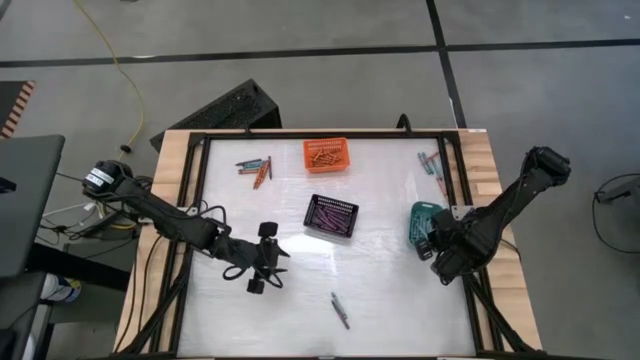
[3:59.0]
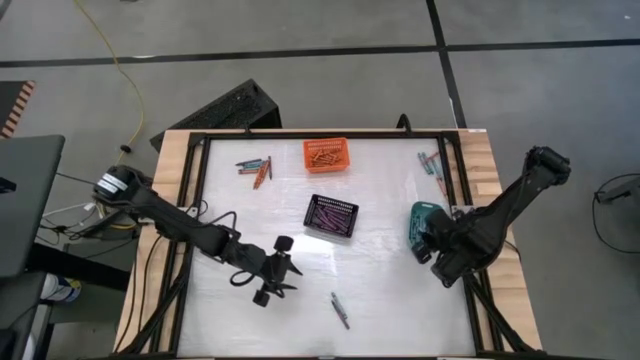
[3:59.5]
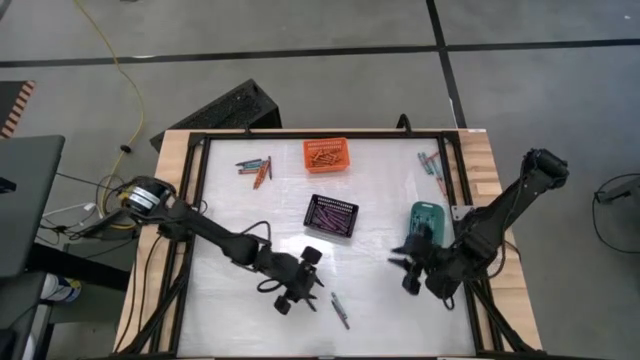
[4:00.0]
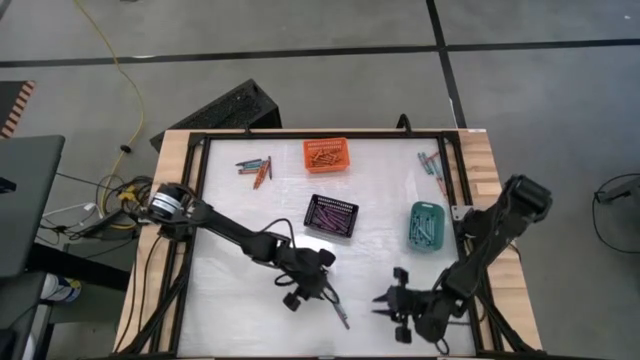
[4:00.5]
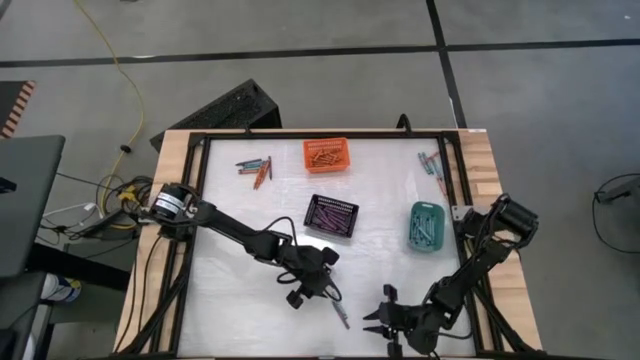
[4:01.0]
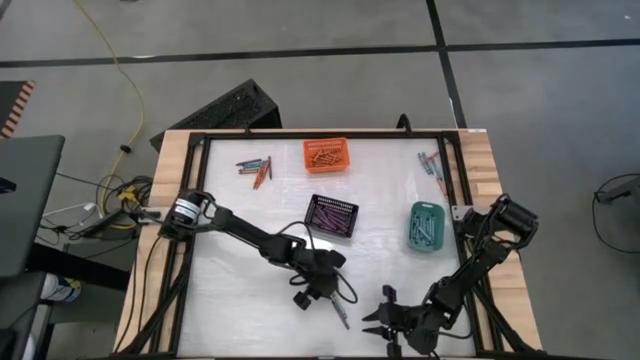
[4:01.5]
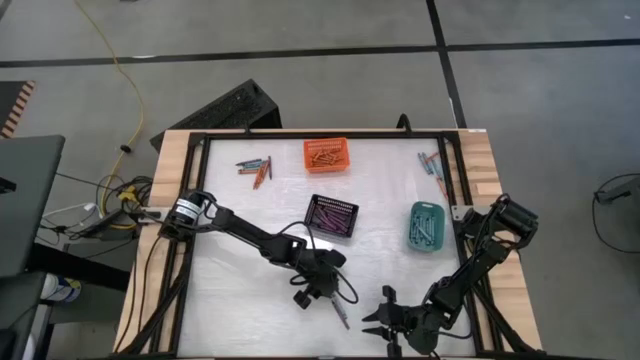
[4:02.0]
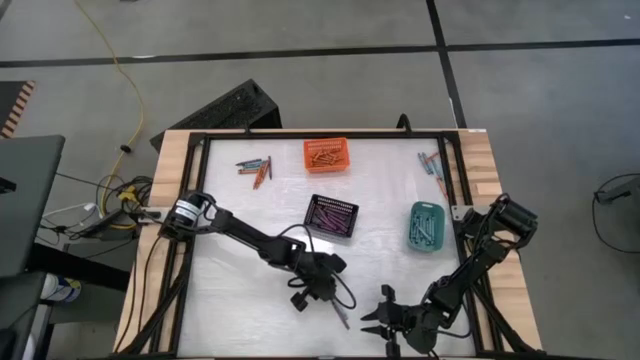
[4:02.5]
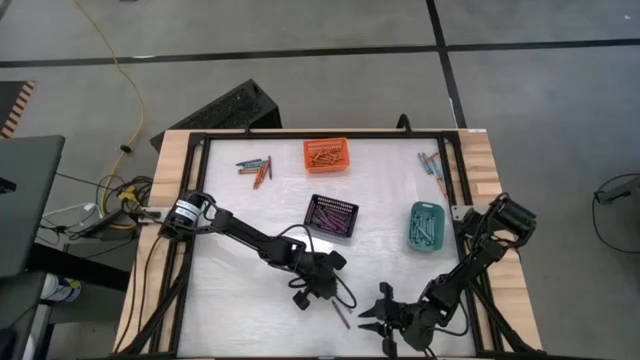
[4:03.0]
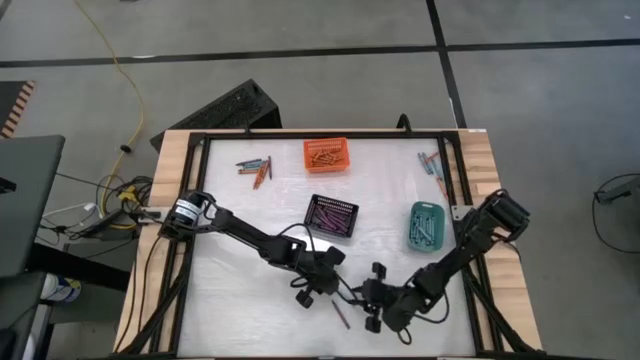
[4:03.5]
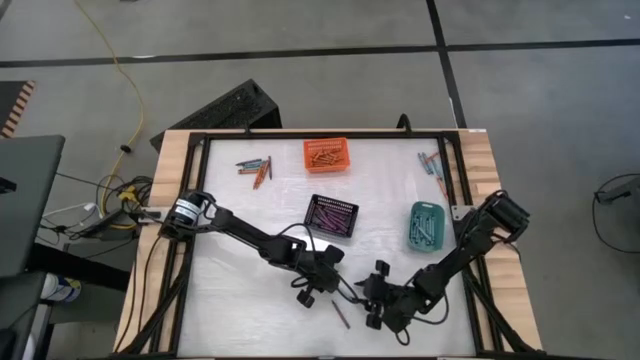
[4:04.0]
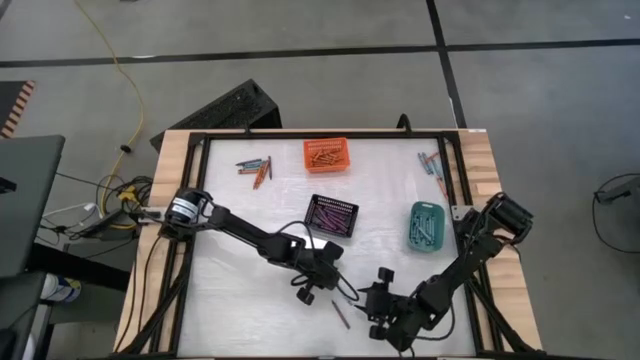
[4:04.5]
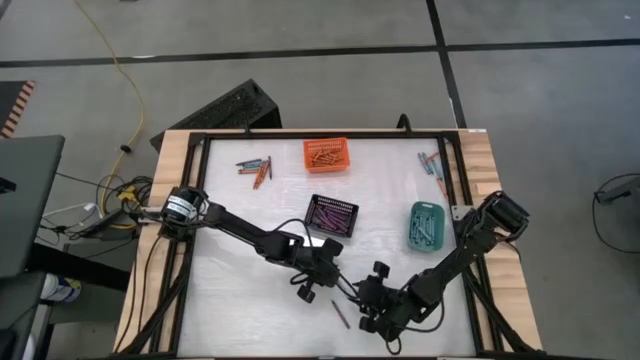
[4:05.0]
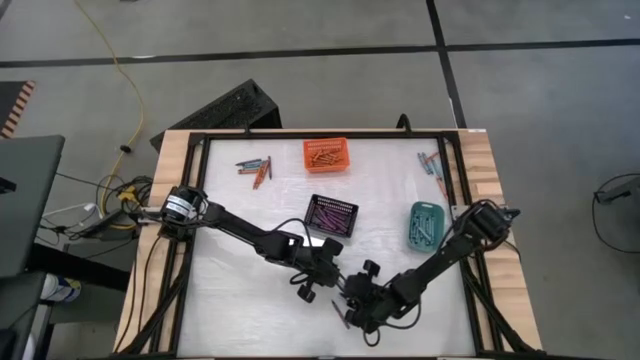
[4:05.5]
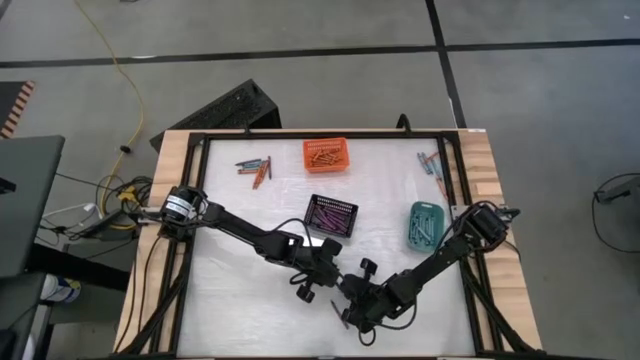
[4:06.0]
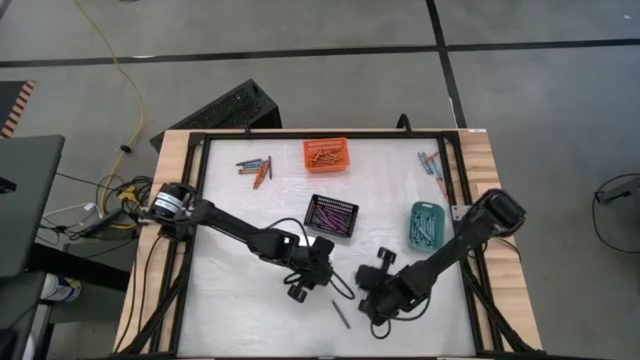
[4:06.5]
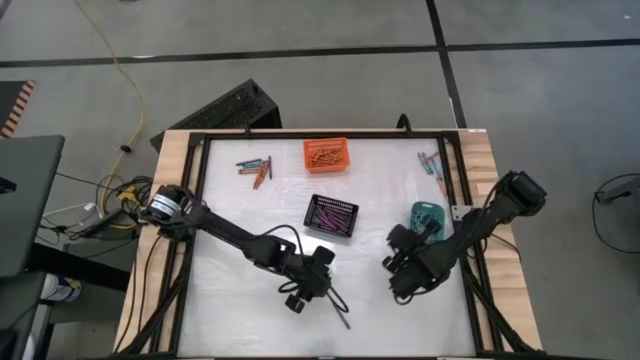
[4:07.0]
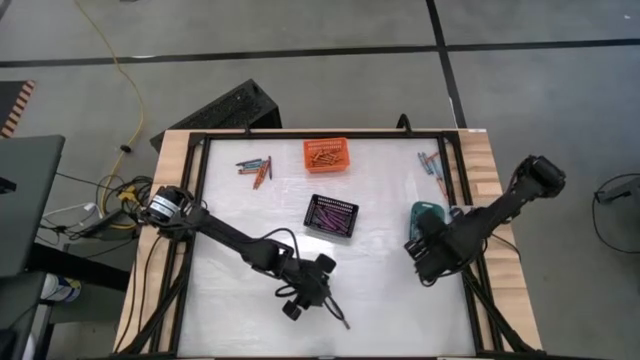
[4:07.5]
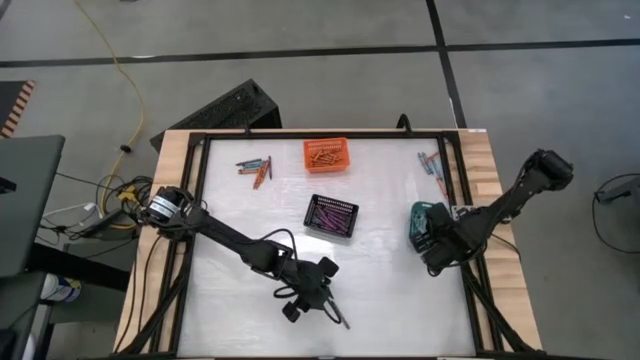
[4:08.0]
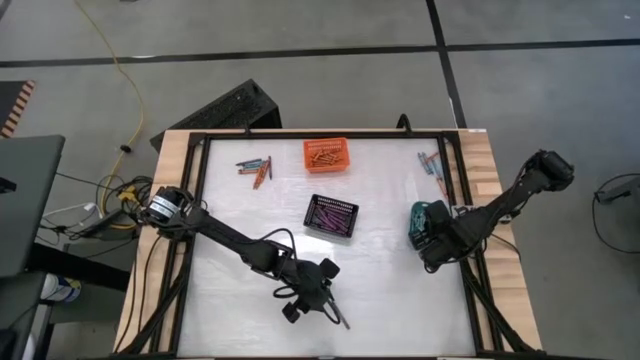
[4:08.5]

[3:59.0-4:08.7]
Task: Sort crayons
Put the blue green crayon into the green bin

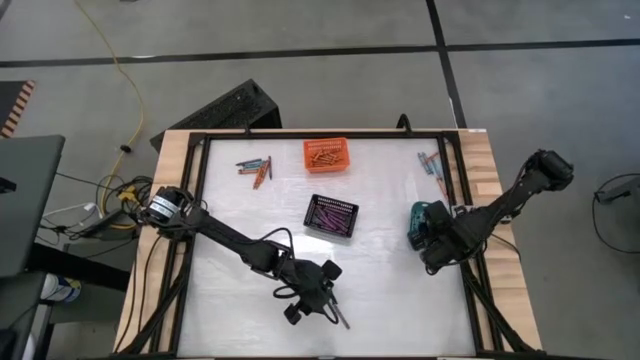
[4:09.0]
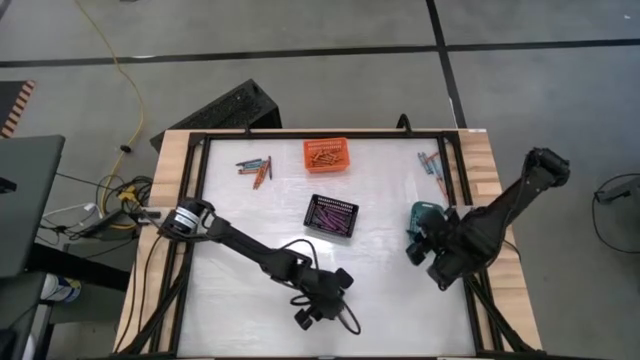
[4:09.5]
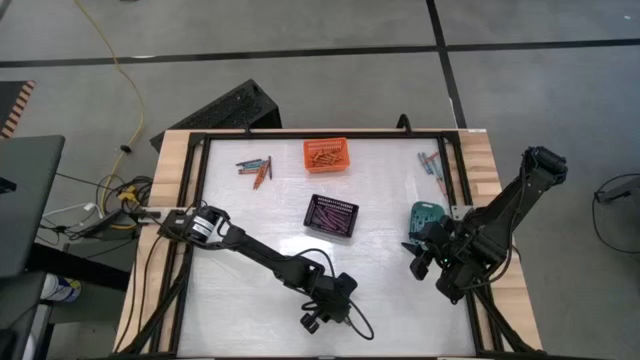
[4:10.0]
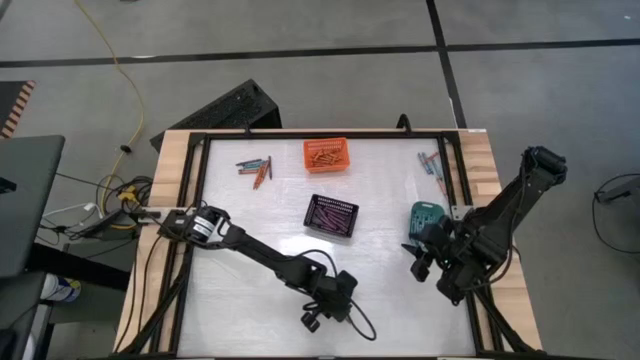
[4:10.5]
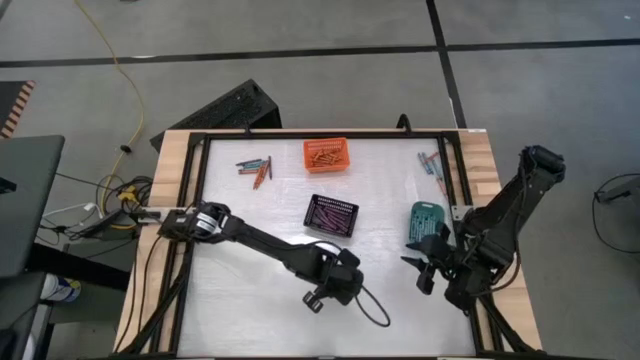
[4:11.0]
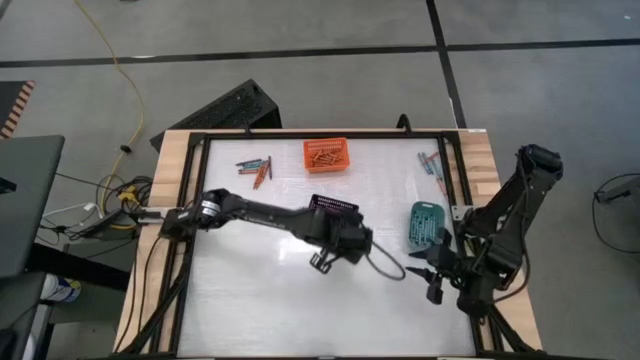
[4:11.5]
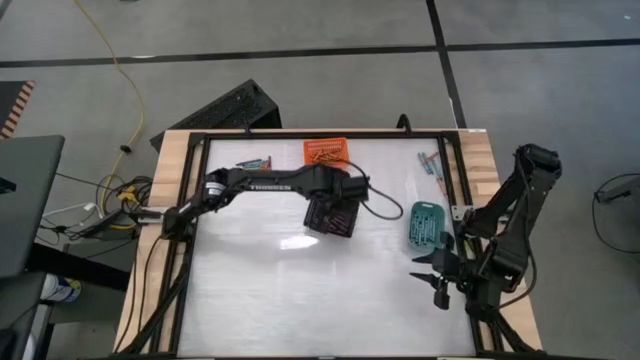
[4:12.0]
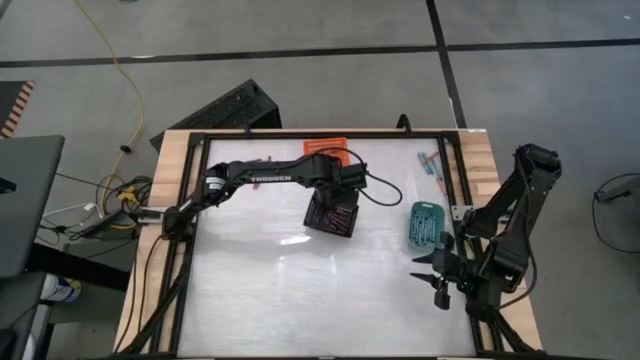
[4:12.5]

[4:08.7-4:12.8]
Put the violet crayon into the black bin

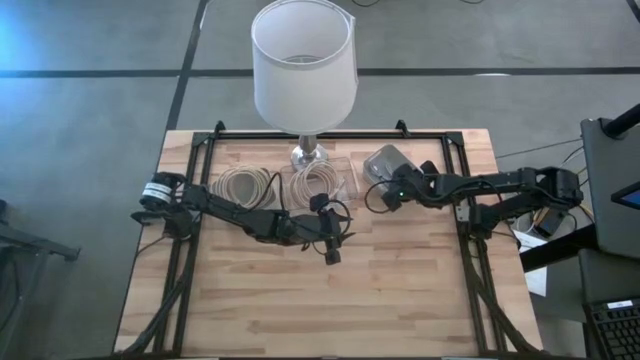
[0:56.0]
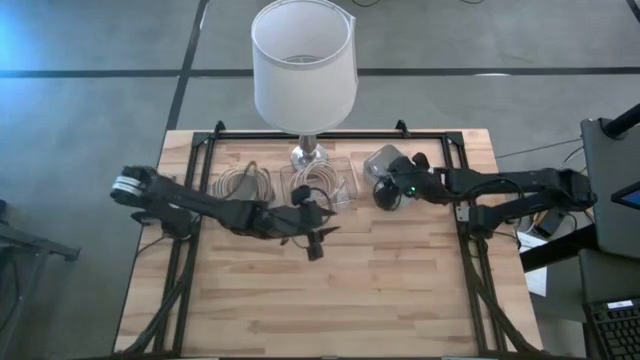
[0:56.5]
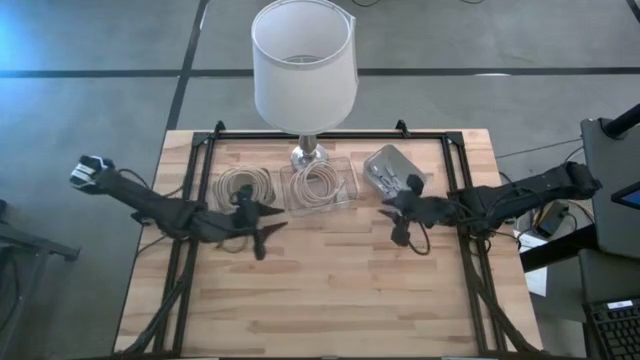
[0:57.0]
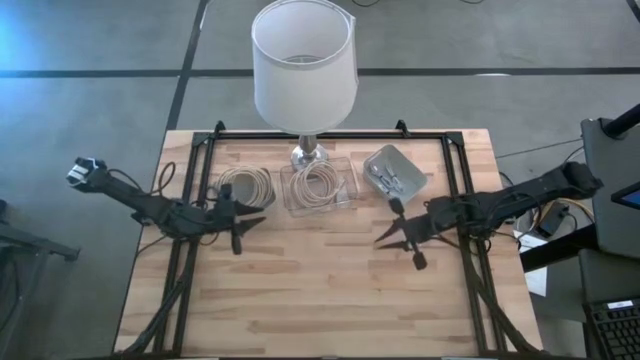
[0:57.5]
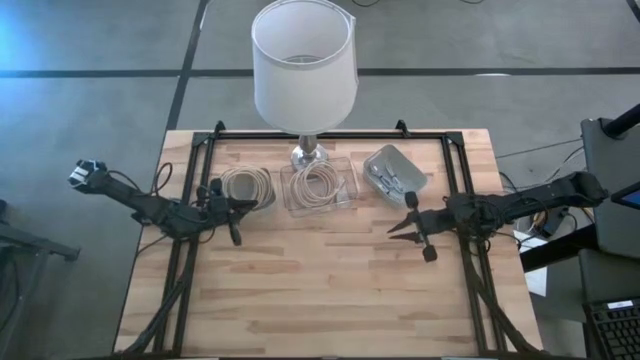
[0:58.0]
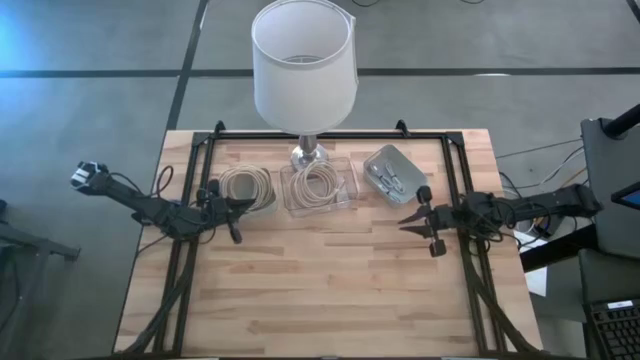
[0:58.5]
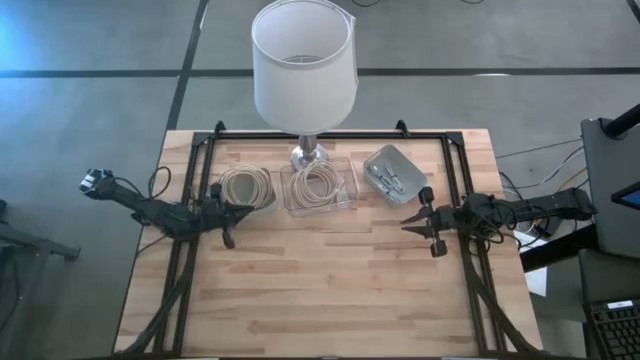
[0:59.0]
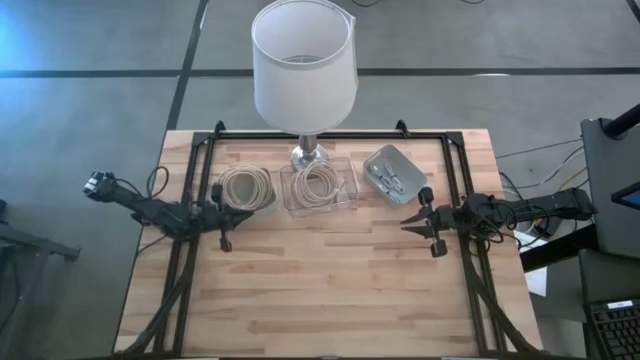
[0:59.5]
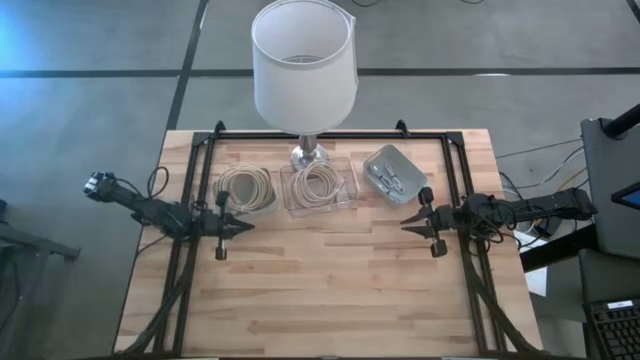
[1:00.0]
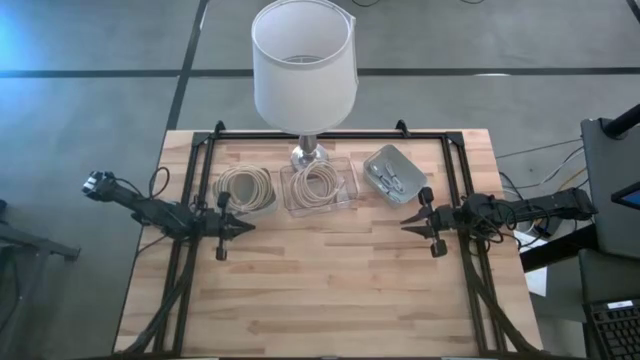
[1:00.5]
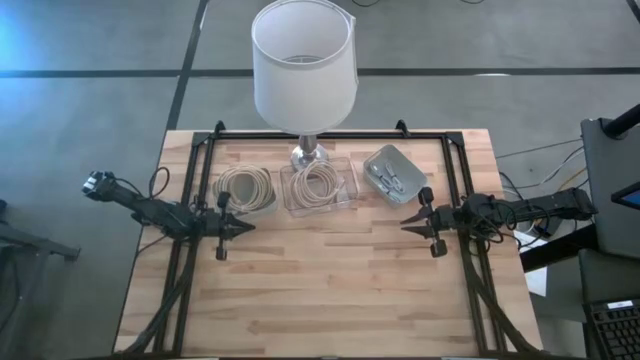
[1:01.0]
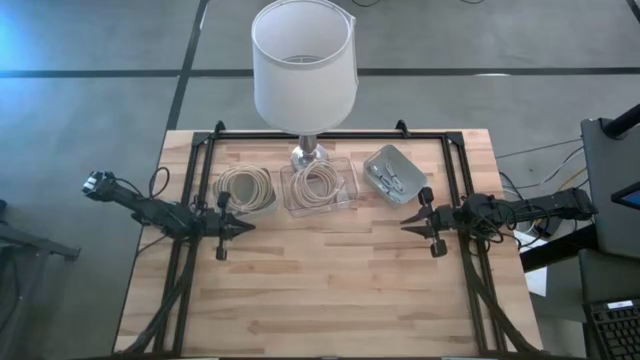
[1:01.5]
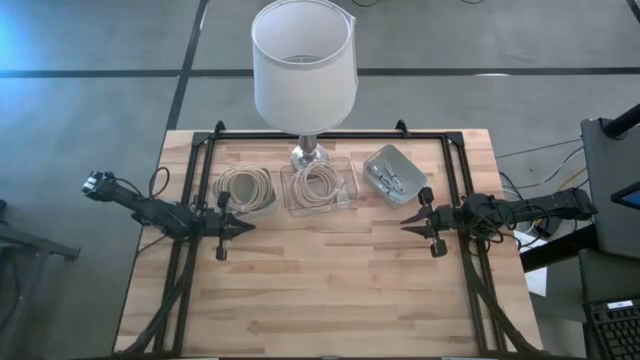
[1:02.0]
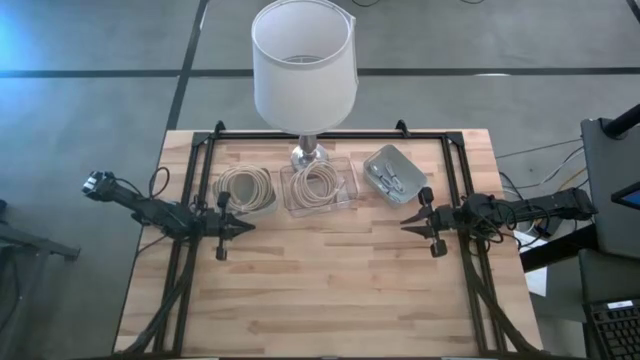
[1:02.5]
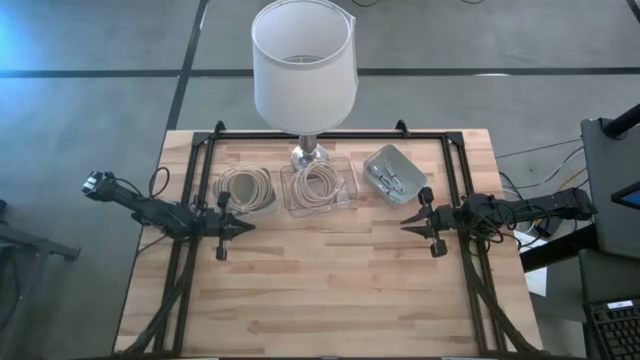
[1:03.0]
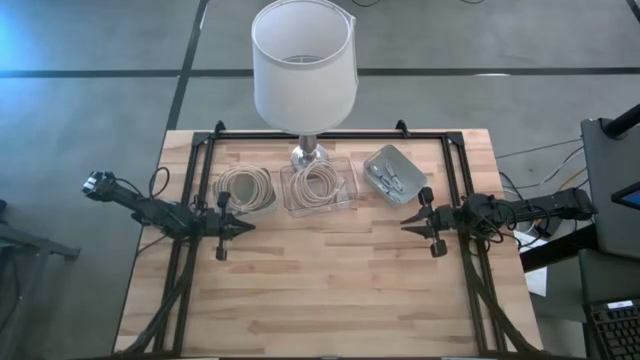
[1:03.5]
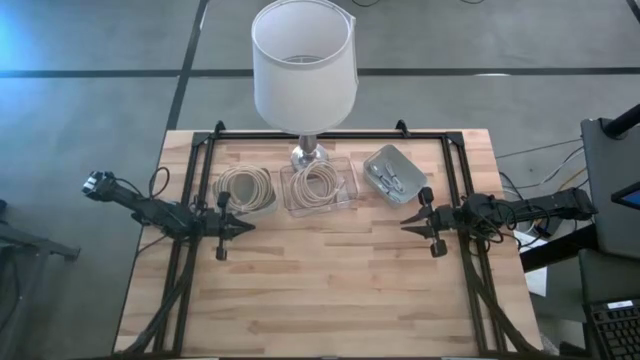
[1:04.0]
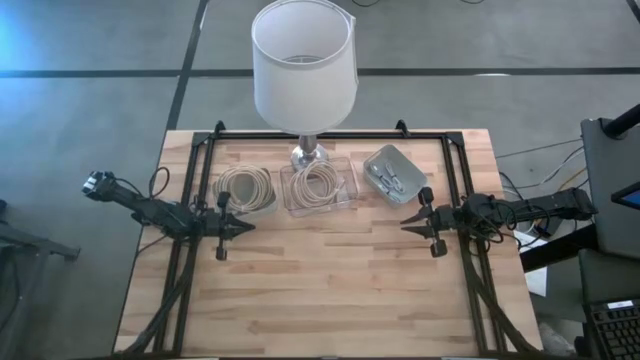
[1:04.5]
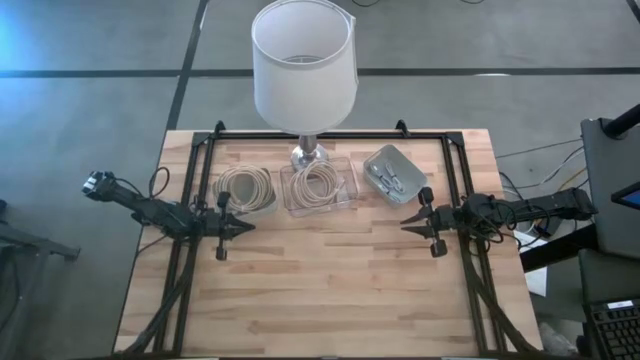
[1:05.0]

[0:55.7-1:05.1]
Task: Pick & Place USB Port
Return to Home Position
